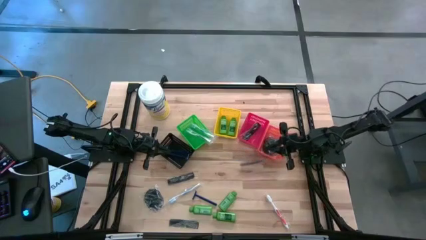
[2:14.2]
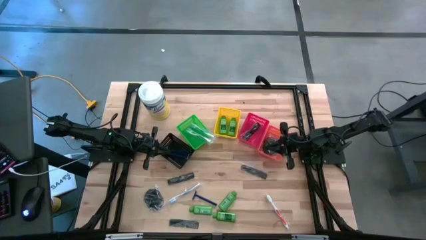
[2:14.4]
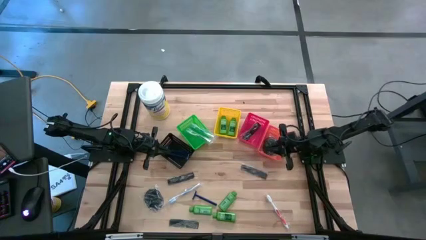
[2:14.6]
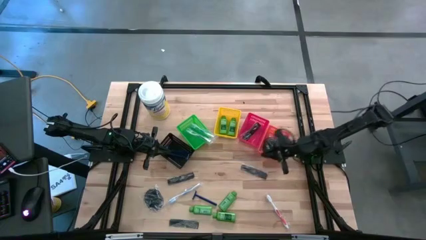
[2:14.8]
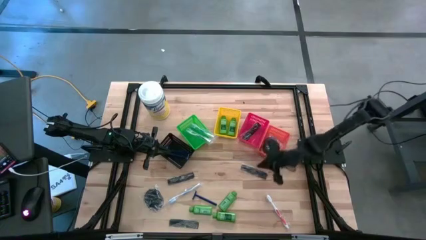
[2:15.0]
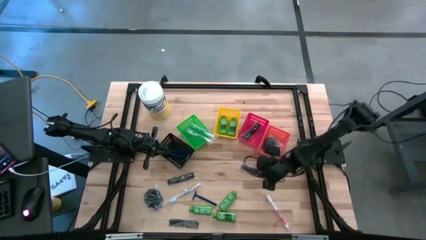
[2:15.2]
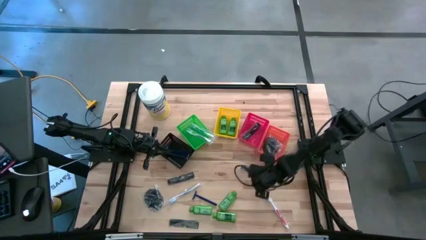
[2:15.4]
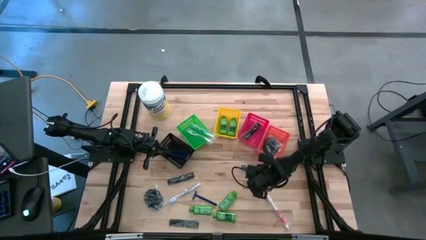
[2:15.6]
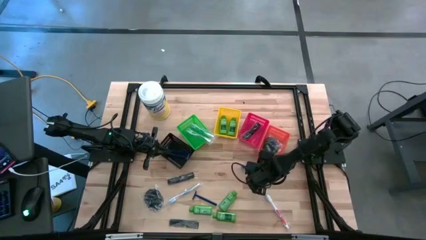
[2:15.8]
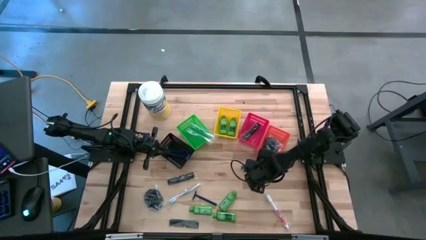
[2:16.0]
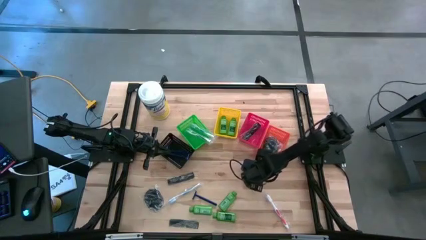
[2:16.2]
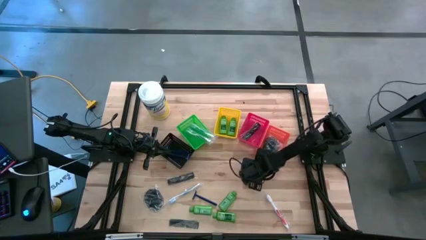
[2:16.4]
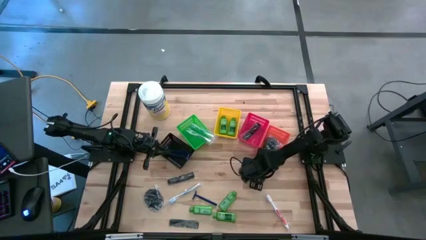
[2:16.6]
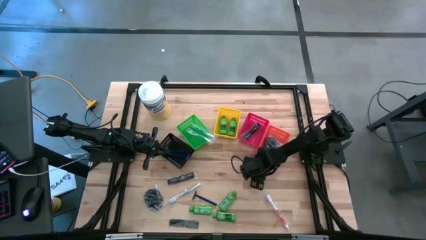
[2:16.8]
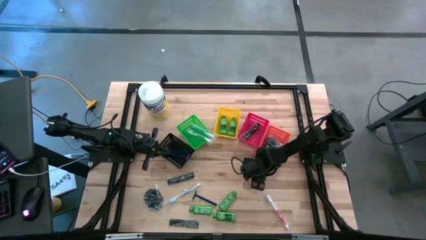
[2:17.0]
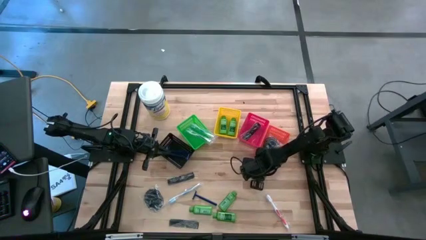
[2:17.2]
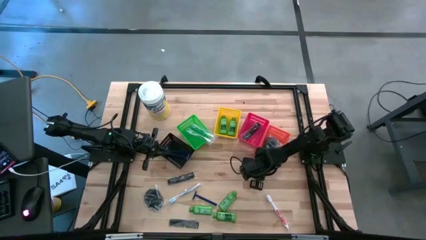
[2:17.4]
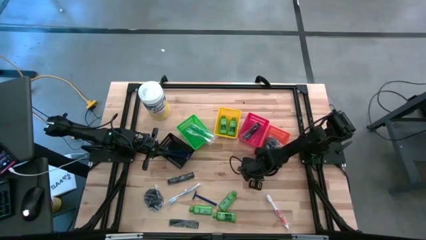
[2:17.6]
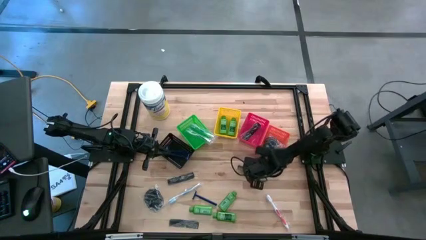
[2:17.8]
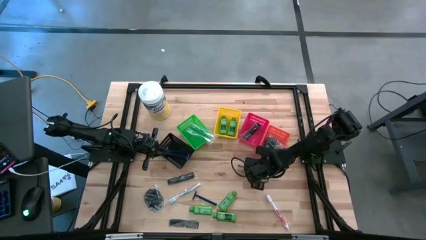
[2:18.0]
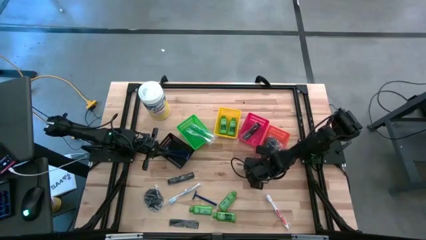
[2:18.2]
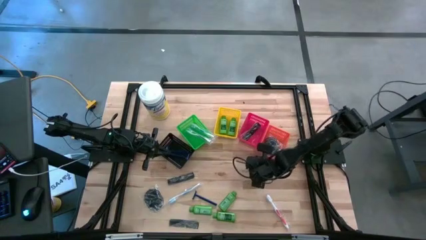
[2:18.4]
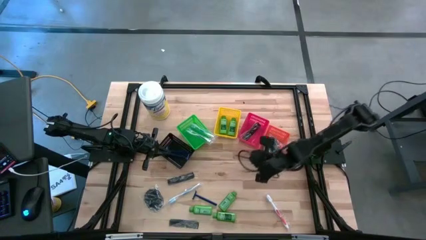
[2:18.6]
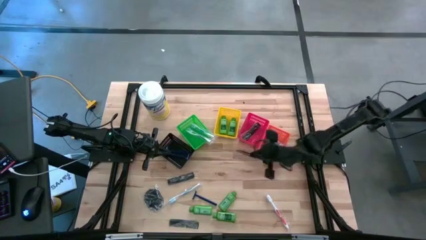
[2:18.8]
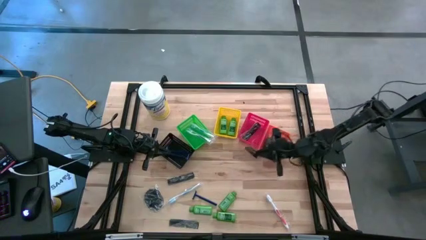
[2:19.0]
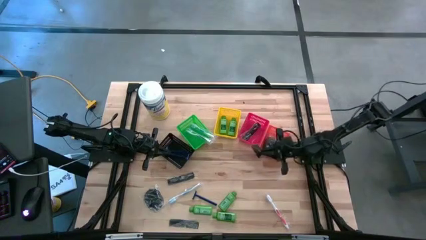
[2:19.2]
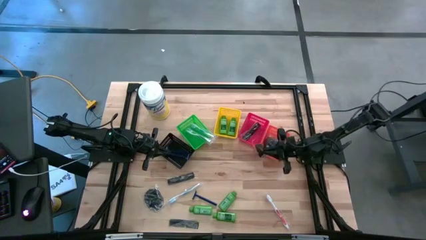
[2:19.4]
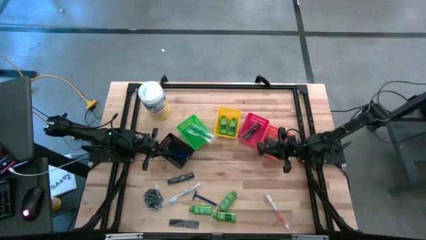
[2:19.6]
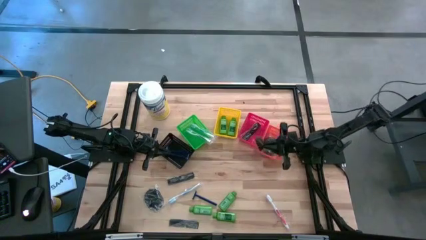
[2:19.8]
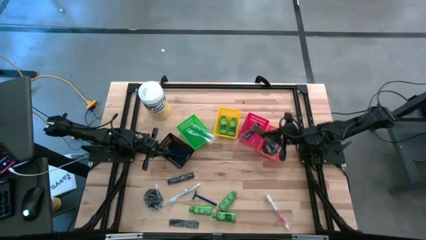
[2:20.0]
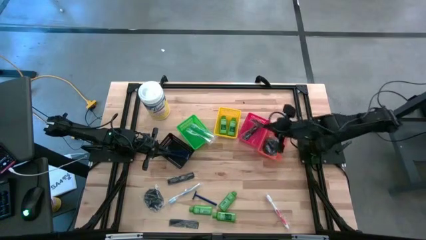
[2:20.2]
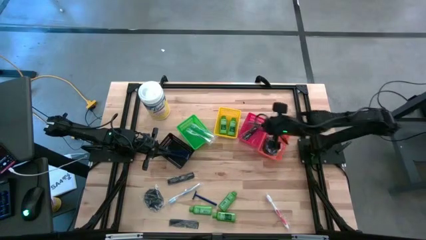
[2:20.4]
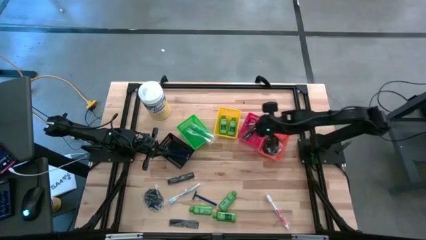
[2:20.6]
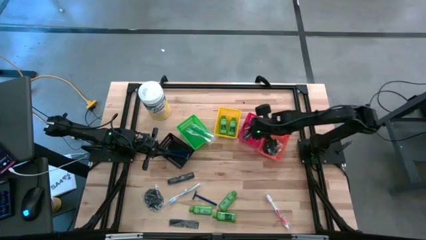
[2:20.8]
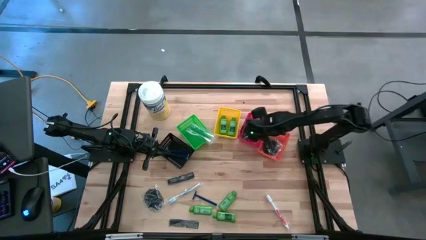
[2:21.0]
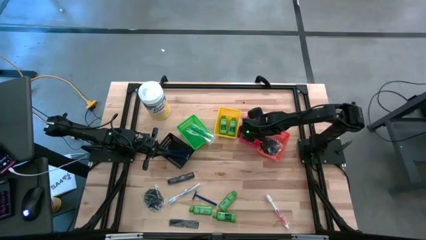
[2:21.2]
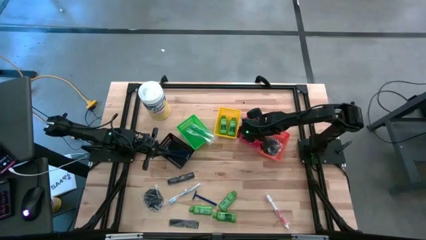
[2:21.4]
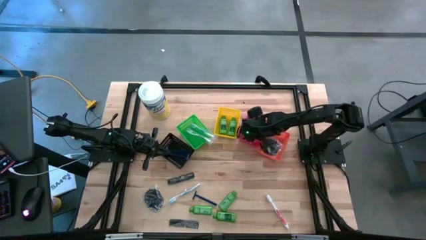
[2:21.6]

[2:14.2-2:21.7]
Task: Pick & Place Travel size toiletries
Put the black comb into the red bin

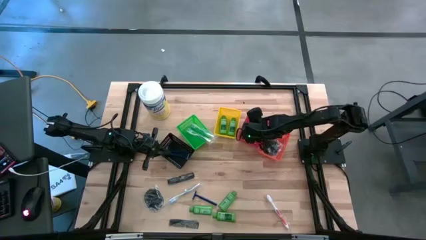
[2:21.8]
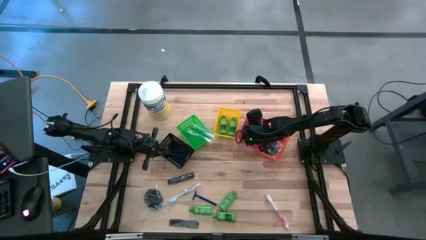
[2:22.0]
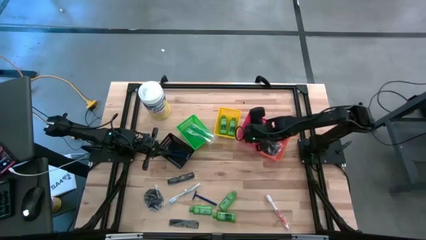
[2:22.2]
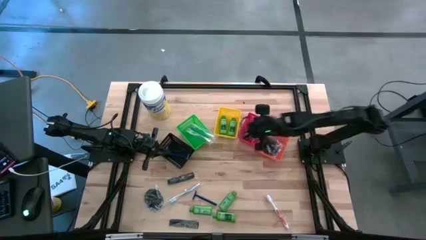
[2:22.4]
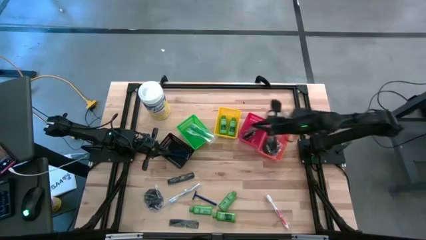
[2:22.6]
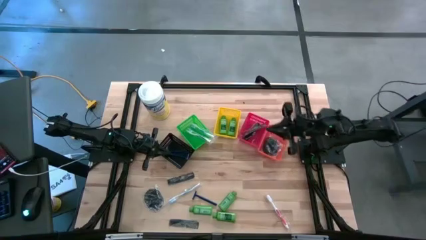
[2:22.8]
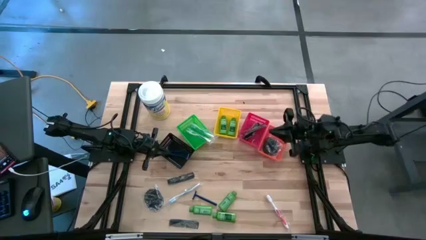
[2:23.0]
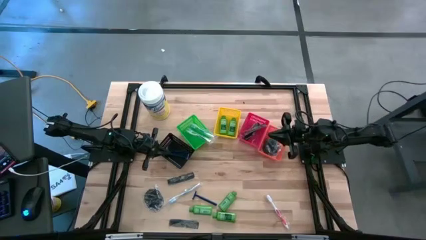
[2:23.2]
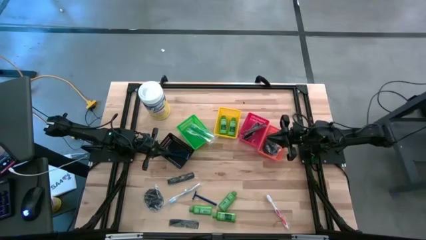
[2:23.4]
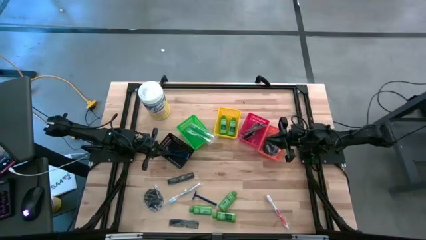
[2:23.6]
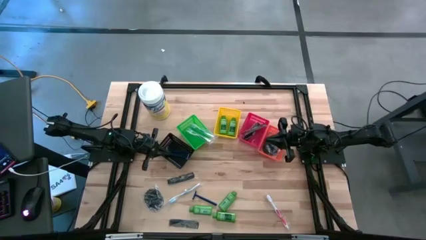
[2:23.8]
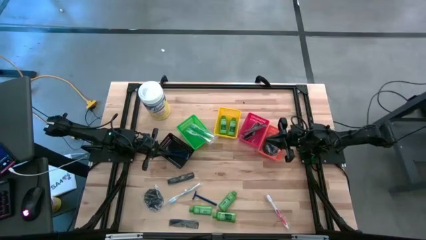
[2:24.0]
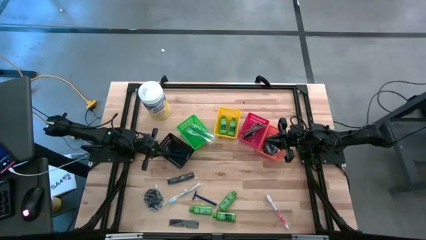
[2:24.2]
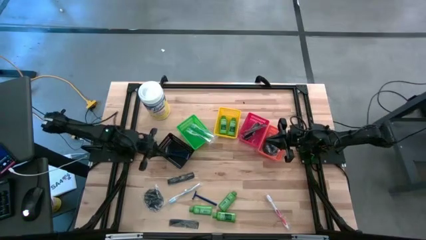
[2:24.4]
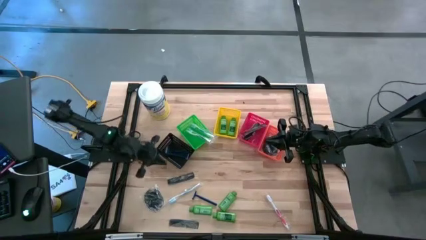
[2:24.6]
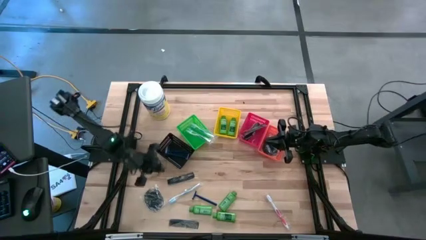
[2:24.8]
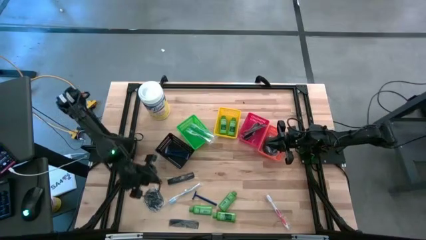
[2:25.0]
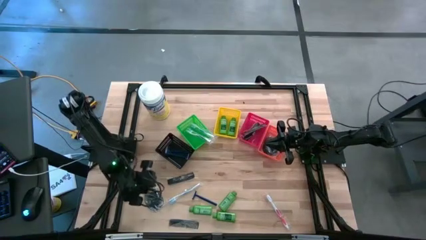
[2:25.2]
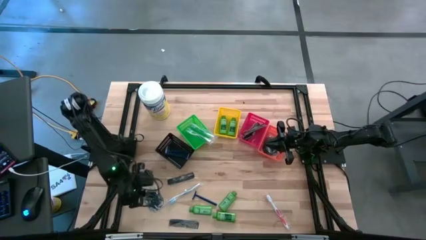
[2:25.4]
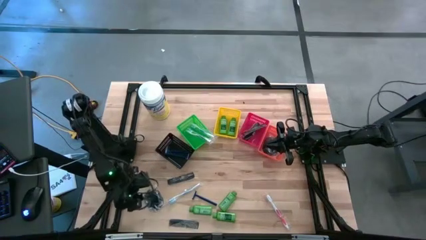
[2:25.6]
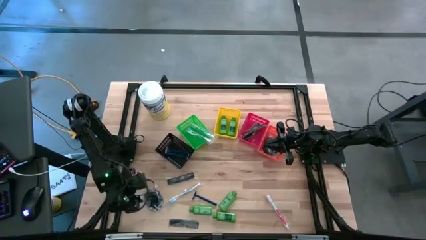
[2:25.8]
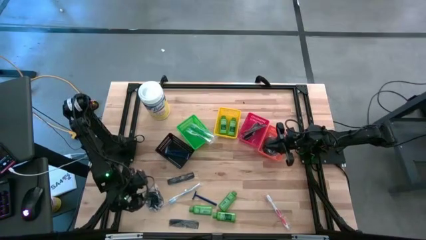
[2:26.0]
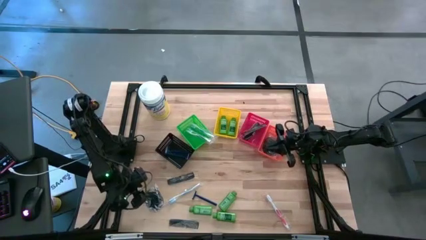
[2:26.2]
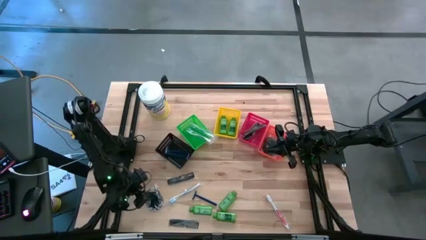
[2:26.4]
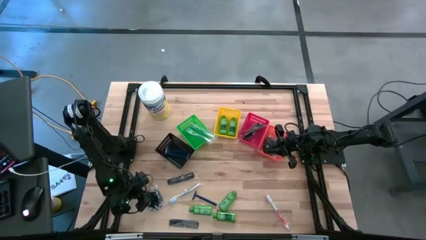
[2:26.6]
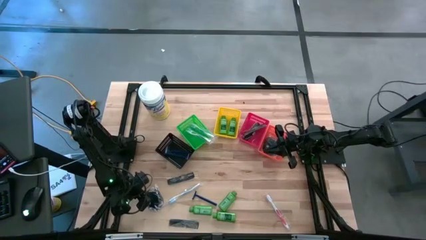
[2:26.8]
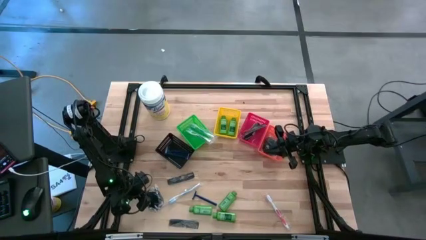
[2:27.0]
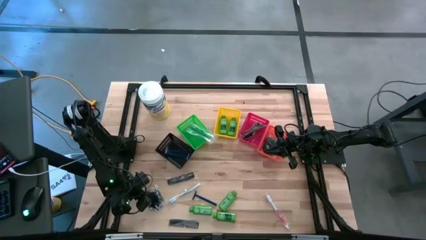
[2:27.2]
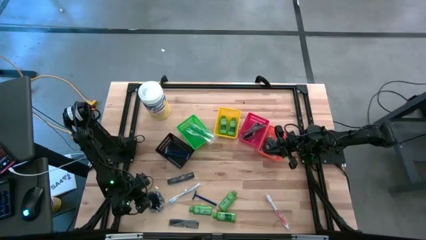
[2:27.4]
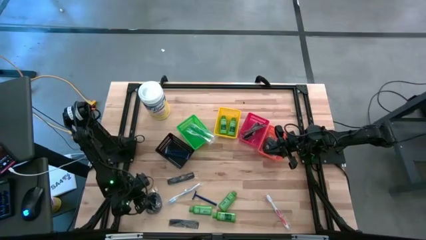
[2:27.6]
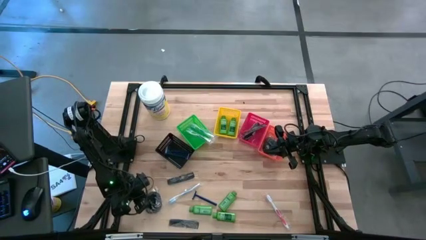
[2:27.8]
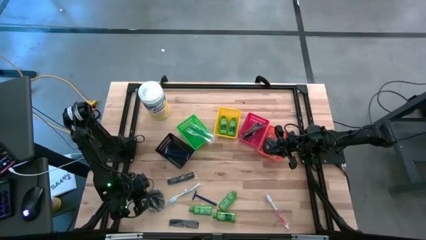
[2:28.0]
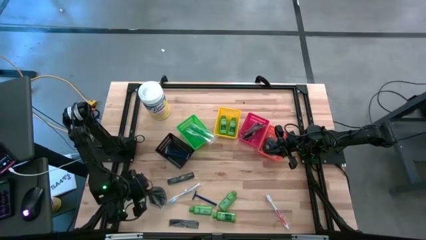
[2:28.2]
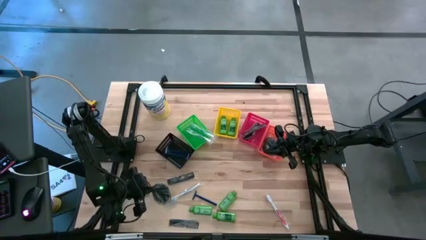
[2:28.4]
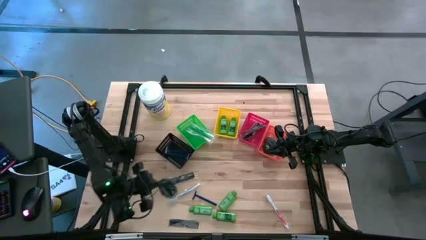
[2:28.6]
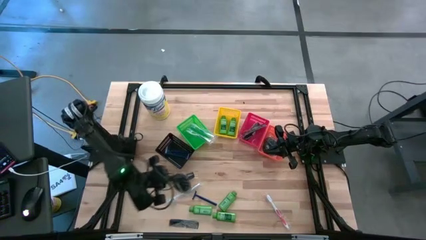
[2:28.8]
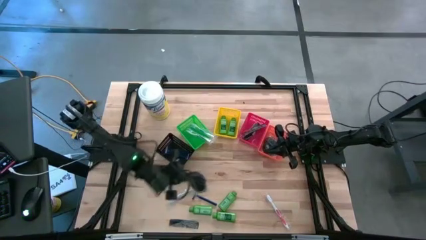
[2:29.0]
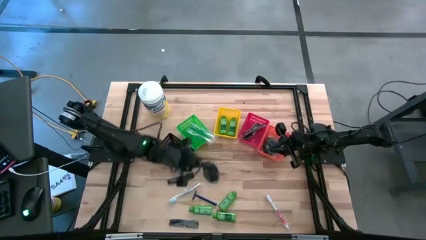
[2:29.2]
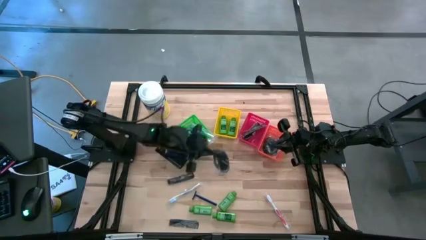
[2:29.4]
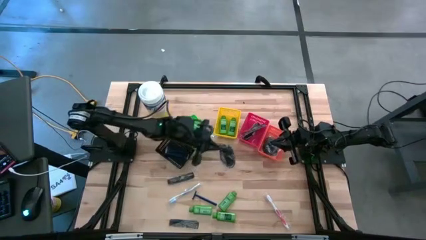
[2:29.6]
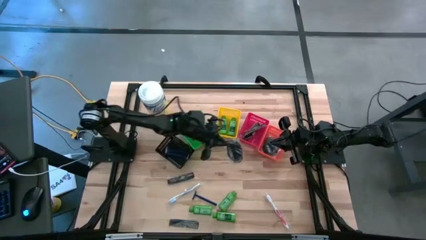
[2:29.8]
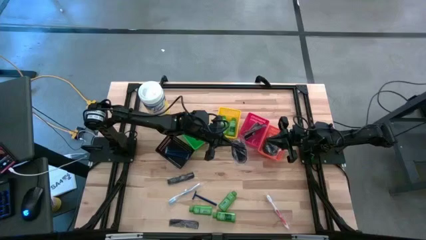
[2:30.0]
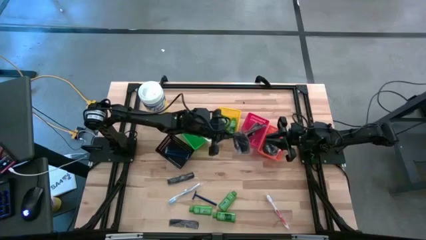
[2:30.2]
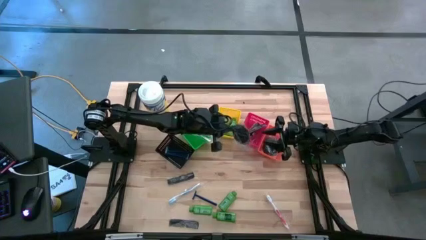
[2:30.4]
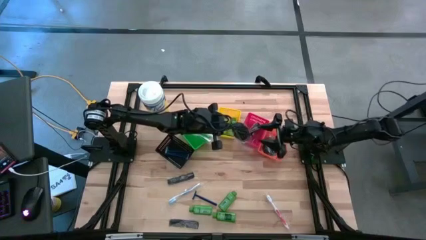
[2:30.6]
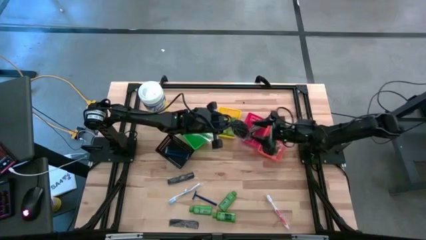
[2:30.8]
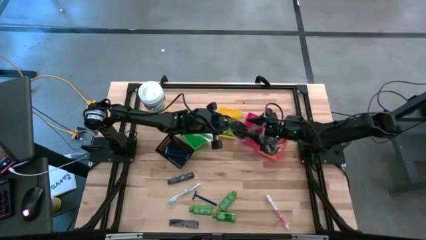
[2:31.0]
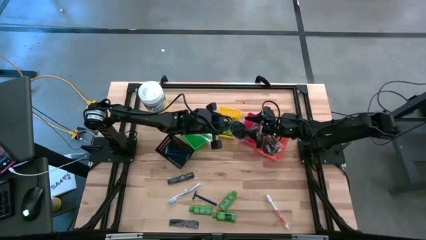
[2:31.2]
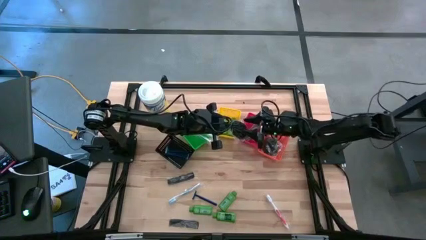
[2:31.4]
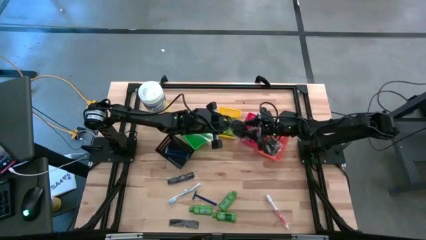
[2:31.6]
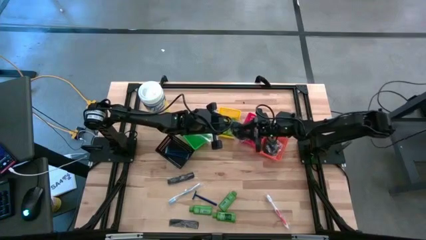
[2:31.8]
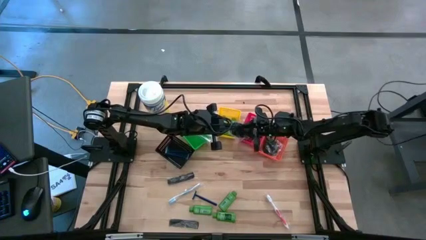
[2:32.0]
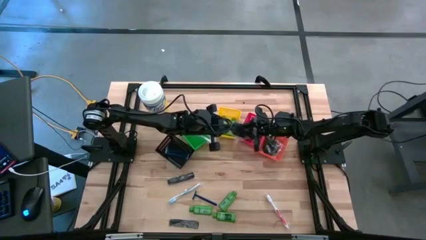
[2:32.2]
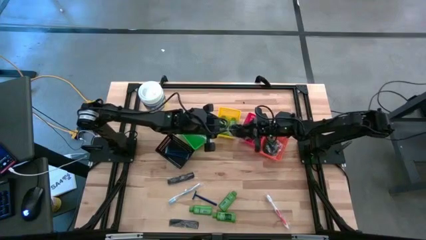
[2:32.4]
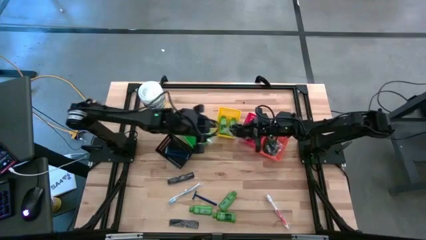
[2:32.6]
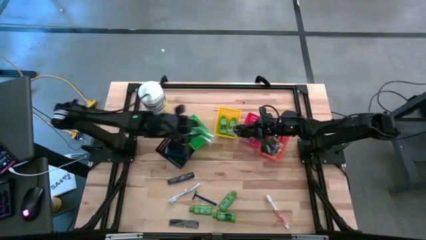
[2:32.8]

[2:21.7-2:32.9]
Put the black hair brush into the orange bin
